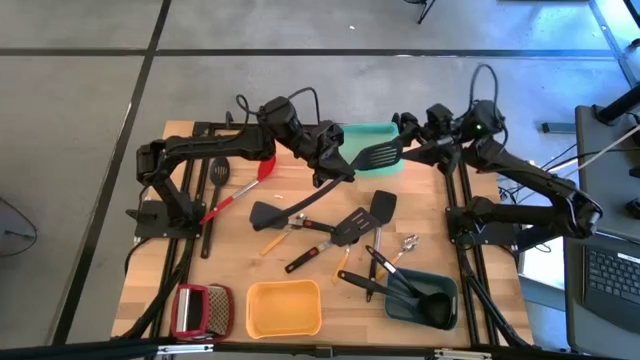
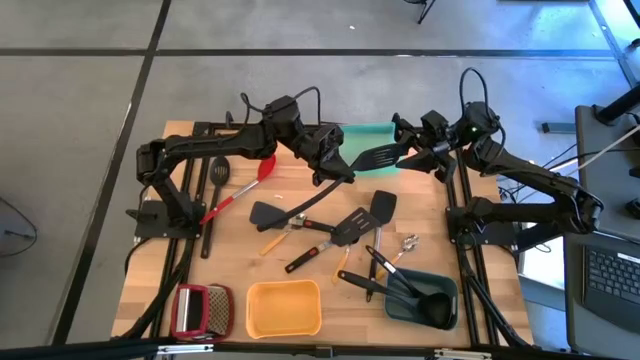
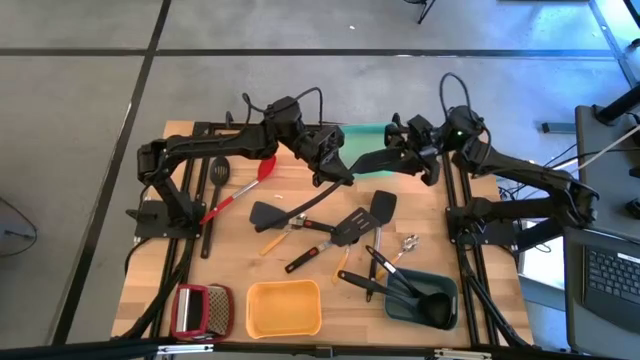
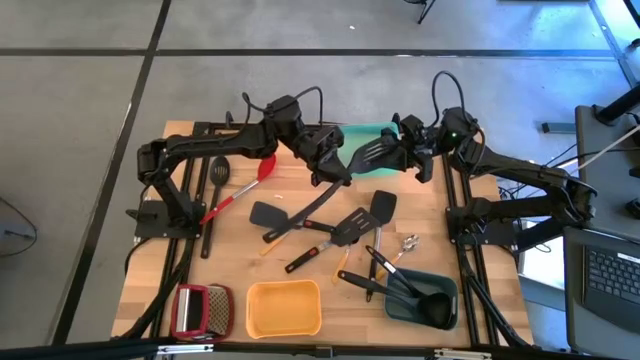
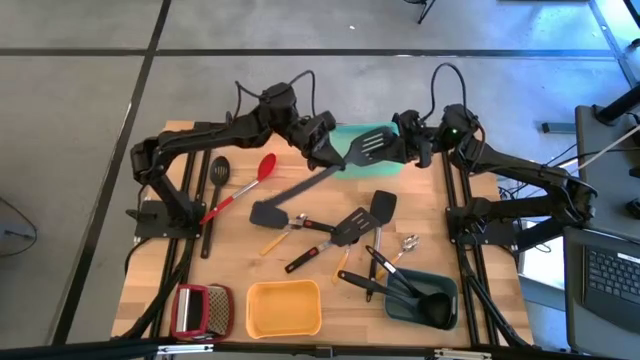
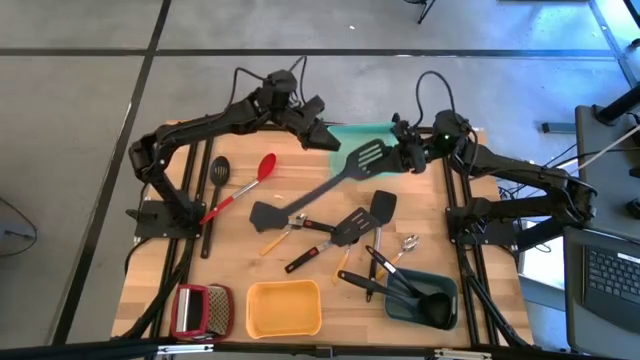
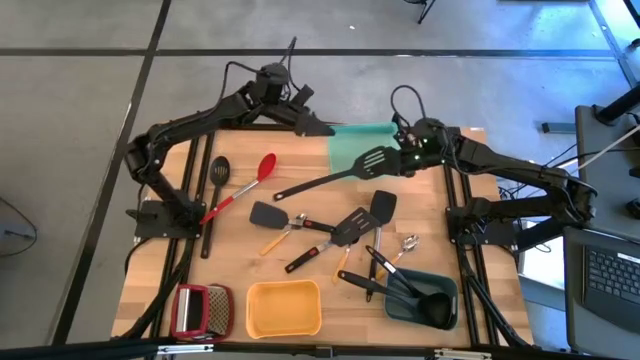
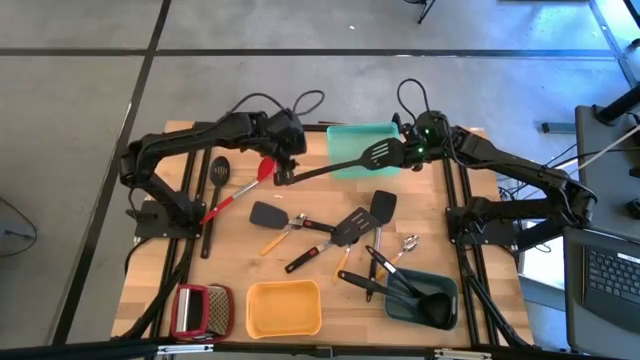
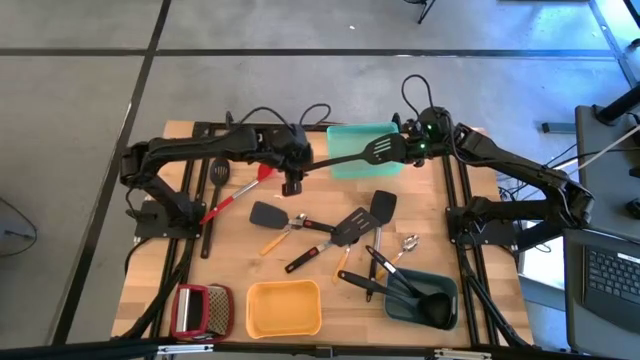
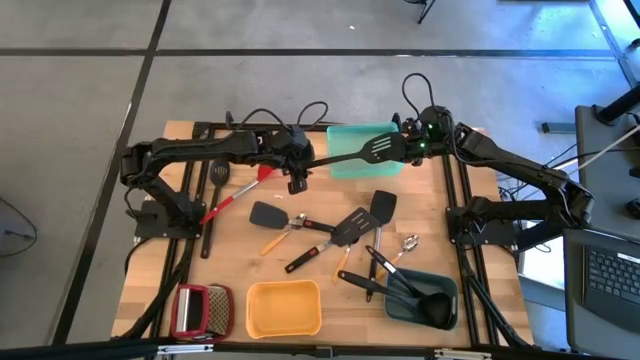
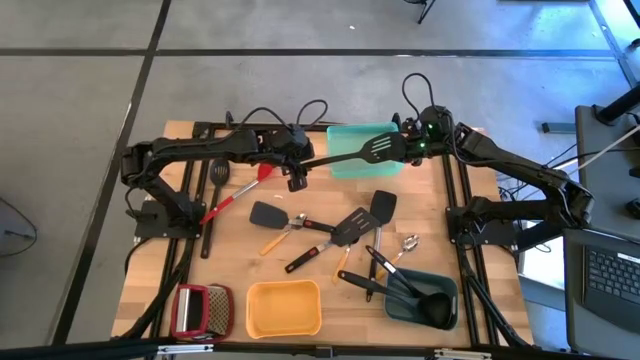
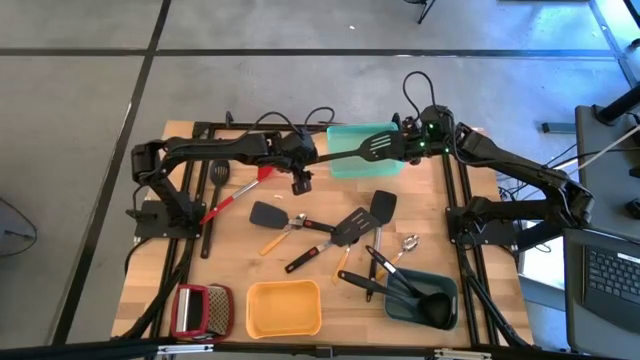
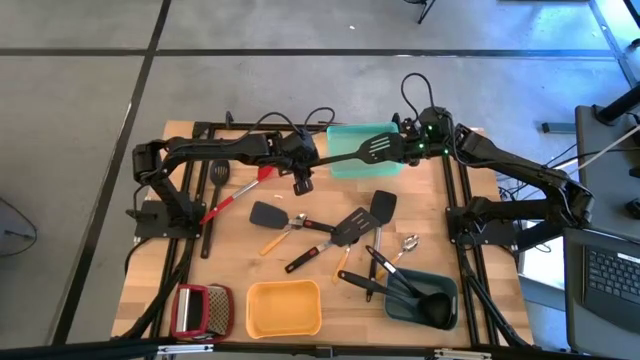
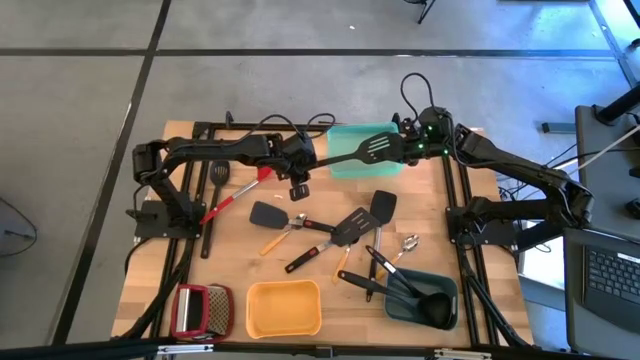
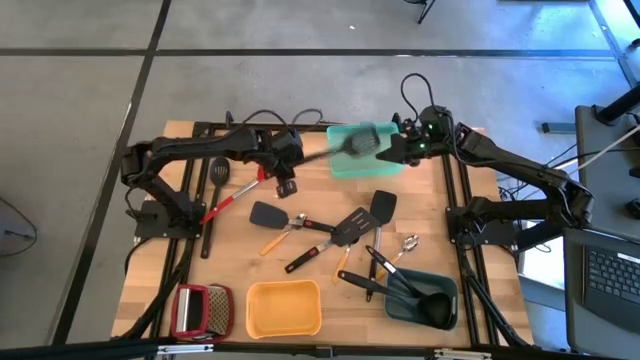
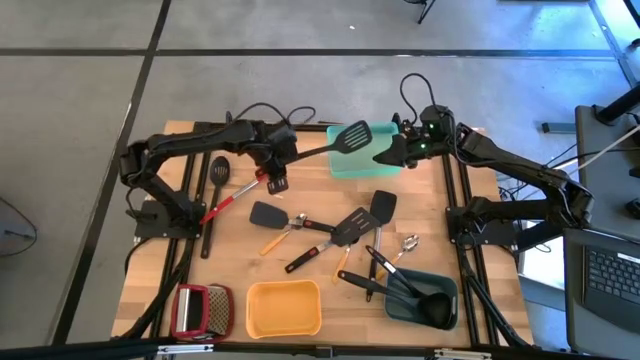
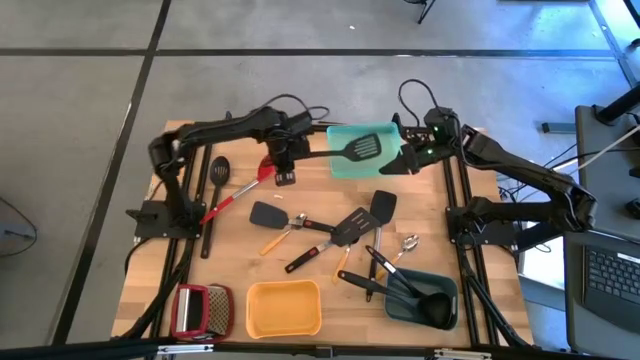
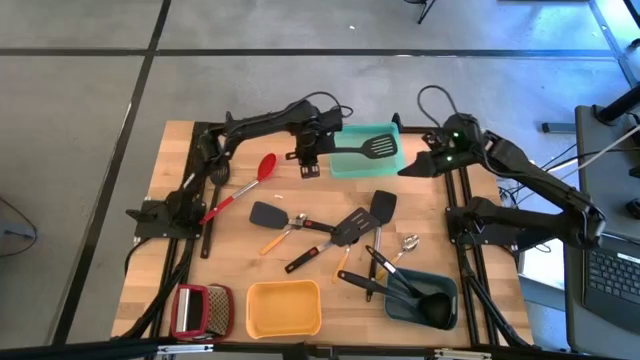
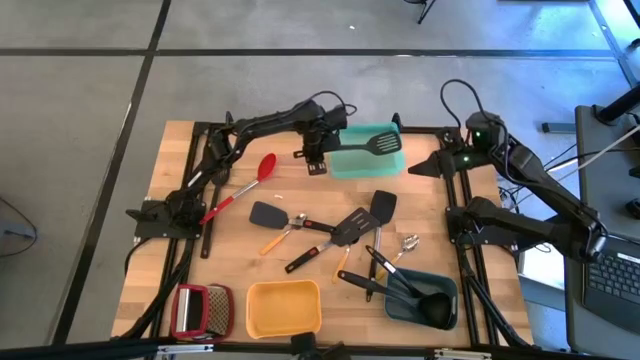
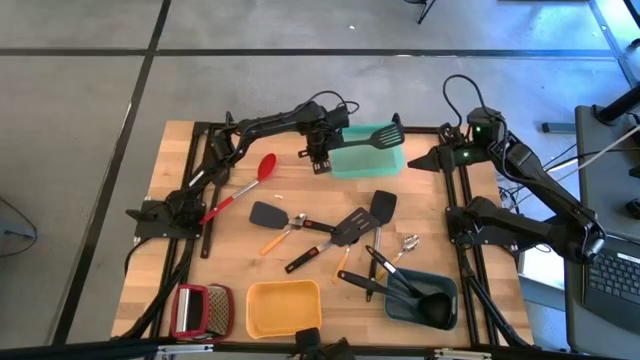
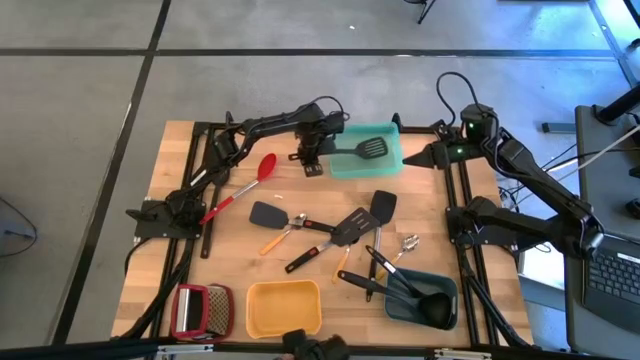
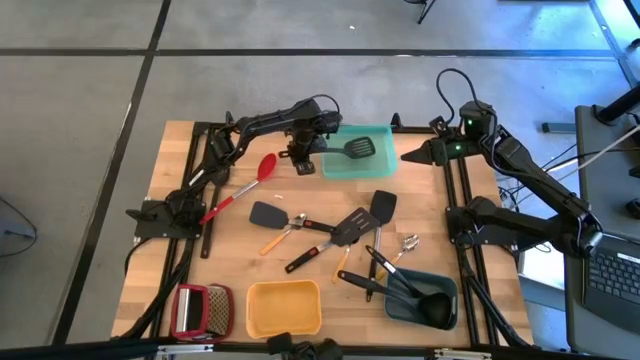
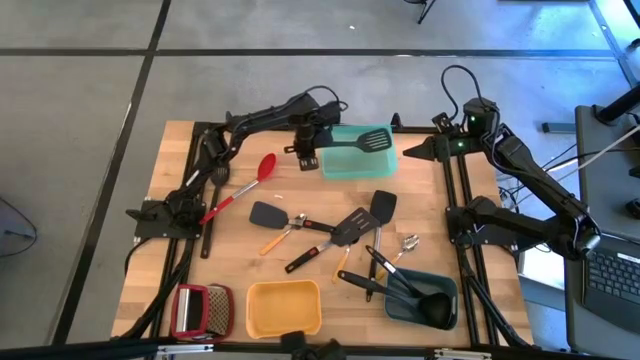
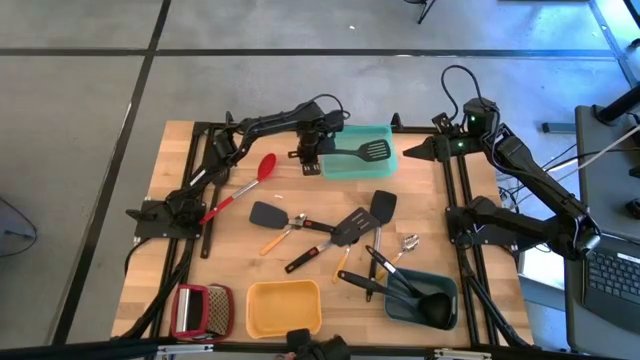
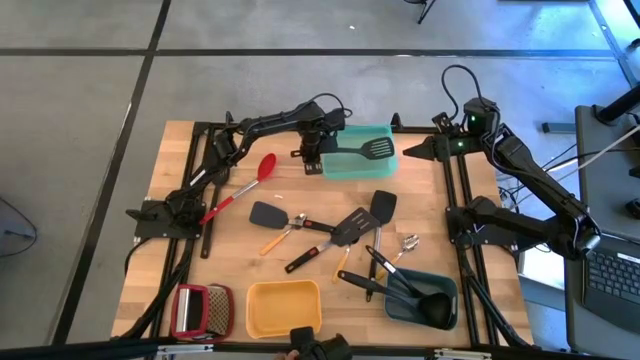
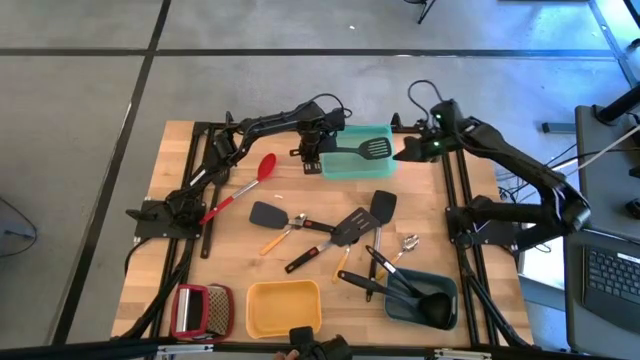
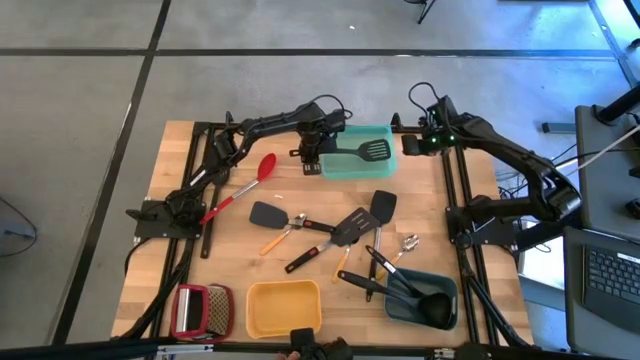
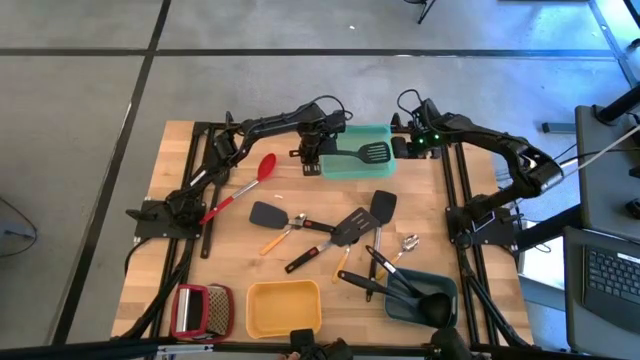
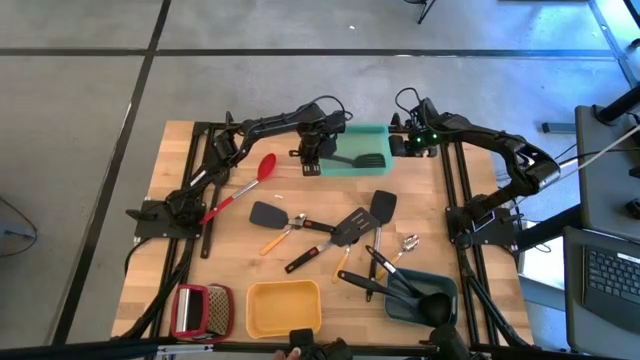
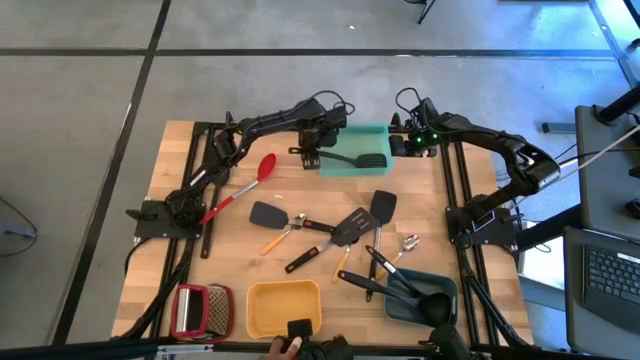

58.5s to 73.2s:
Task: Pick & Place Kitchen Items
Put the black spatula into the green bin

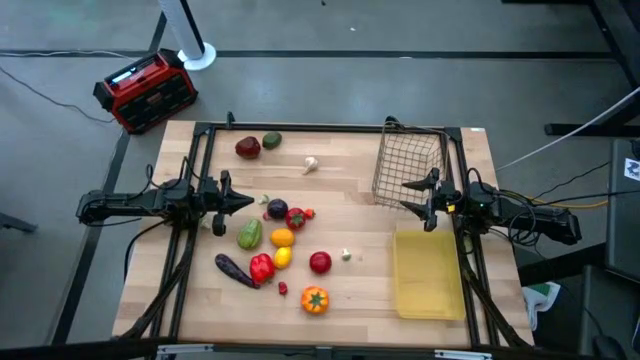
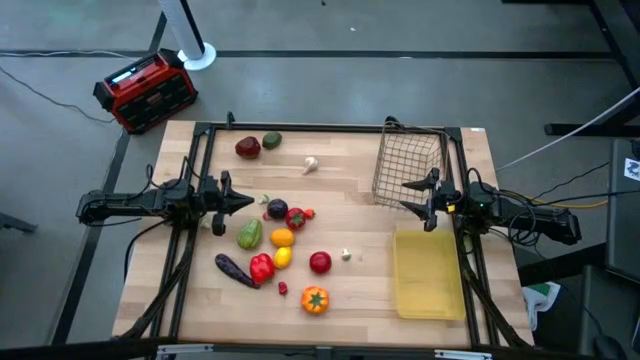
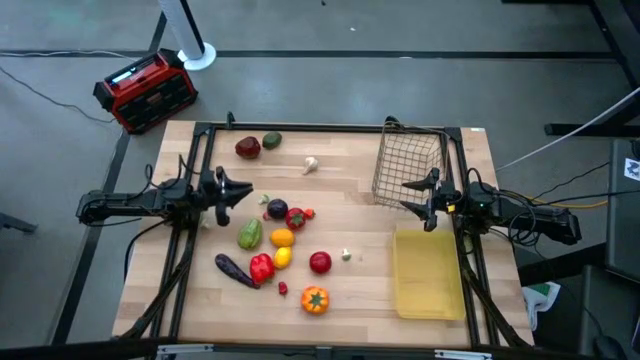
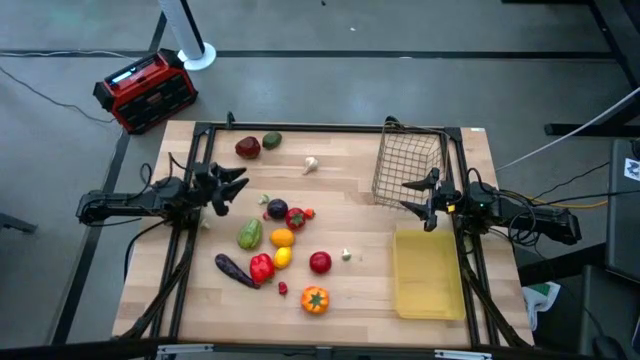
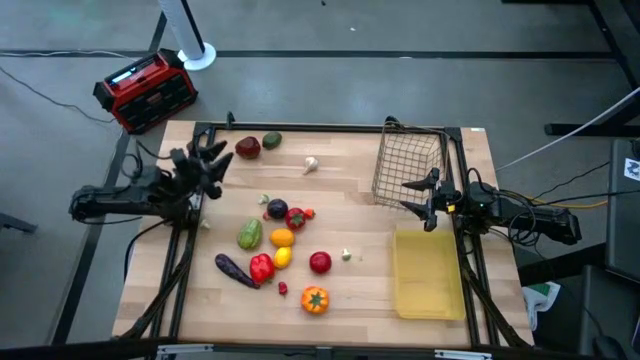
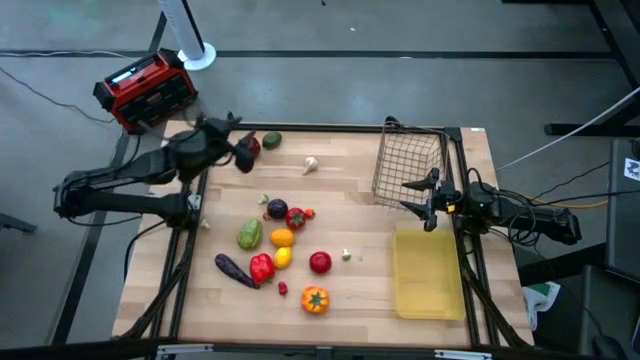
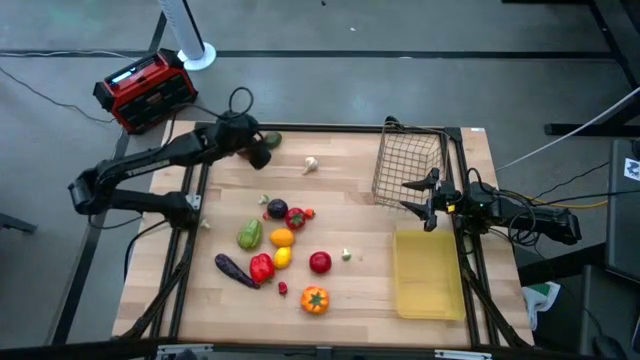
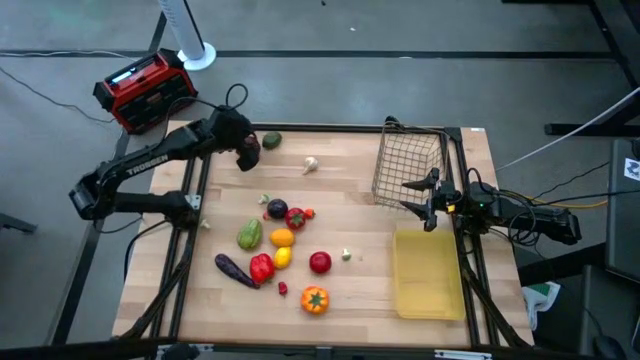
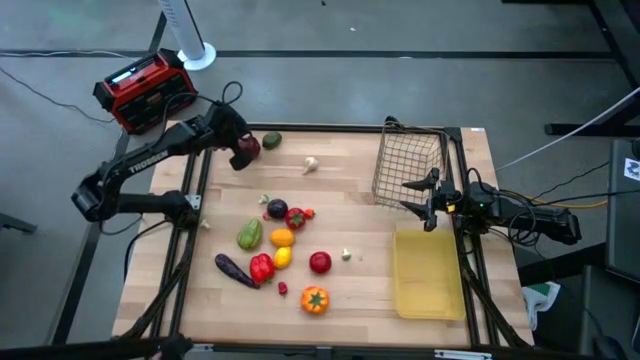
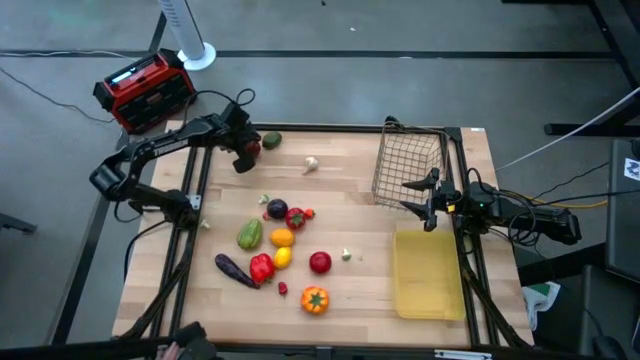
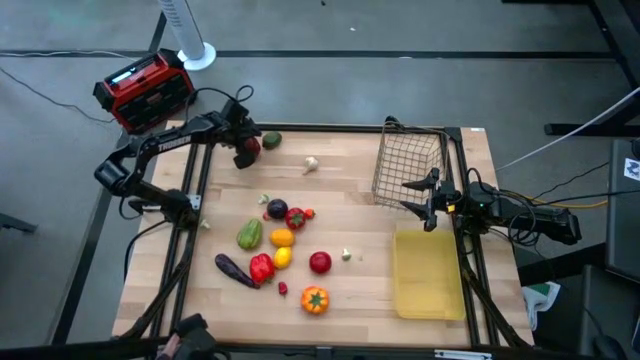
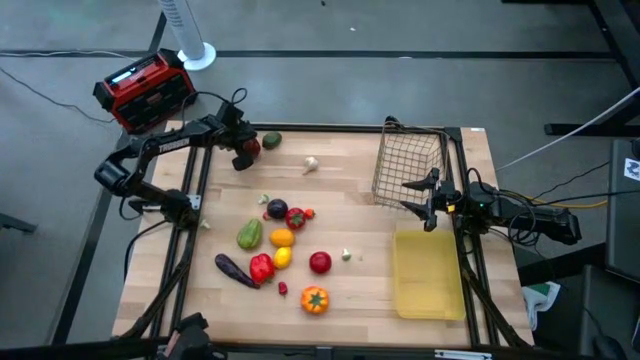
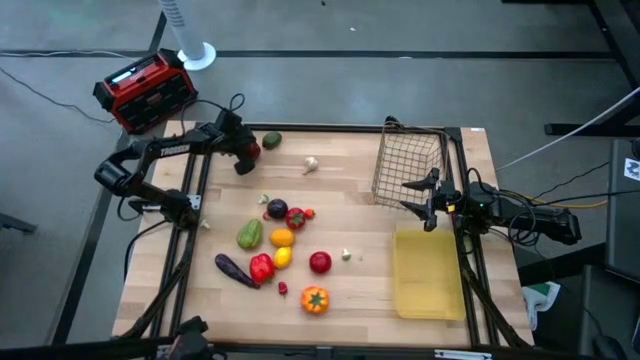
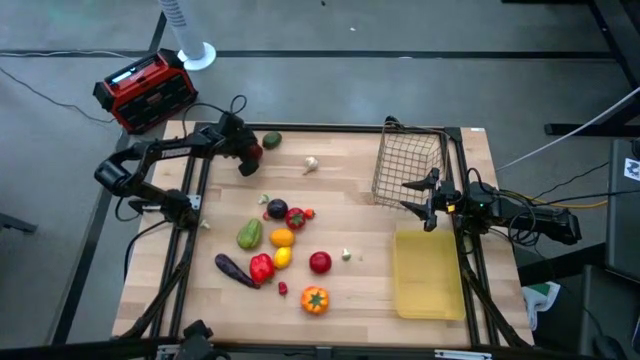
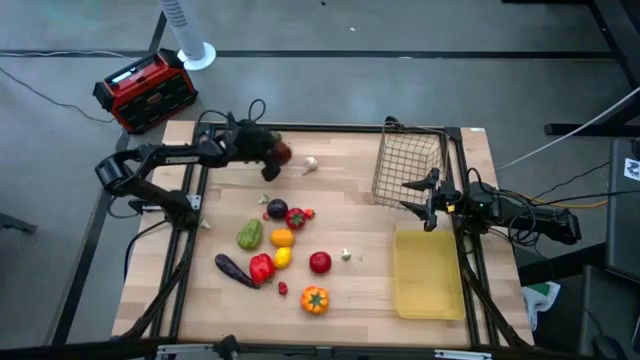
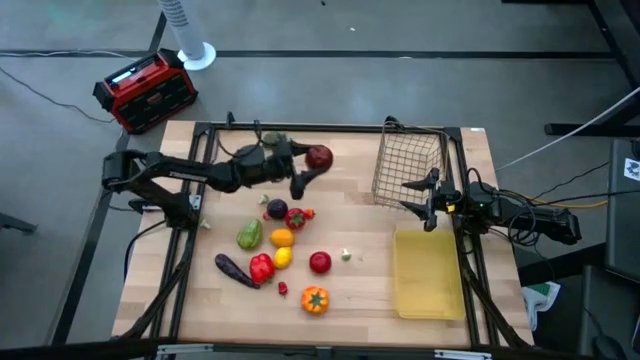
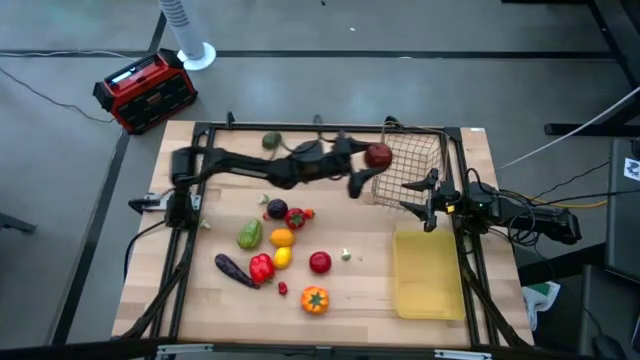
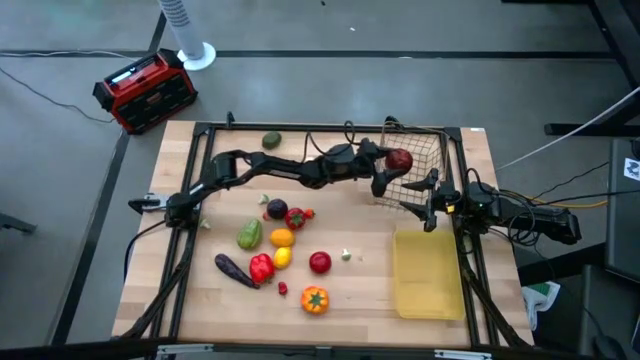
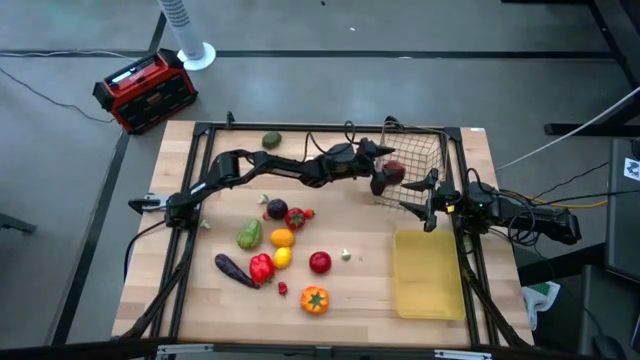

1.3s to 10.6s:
Task: Sort produce into baskets
Put the red apple into the wired basket
